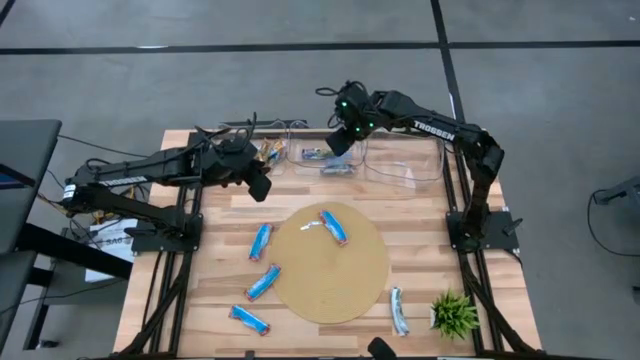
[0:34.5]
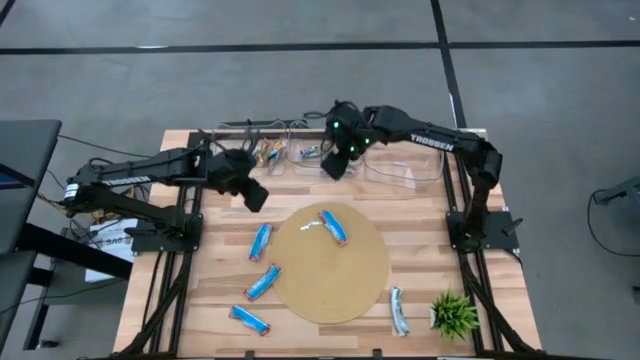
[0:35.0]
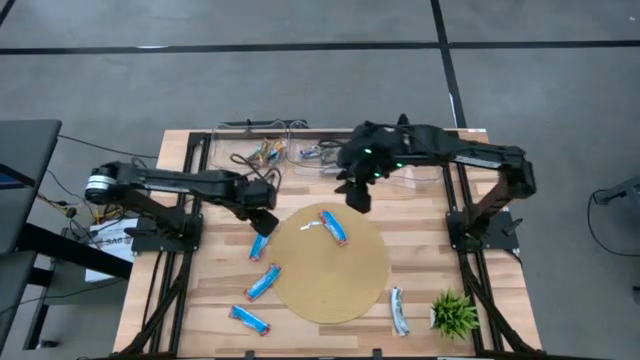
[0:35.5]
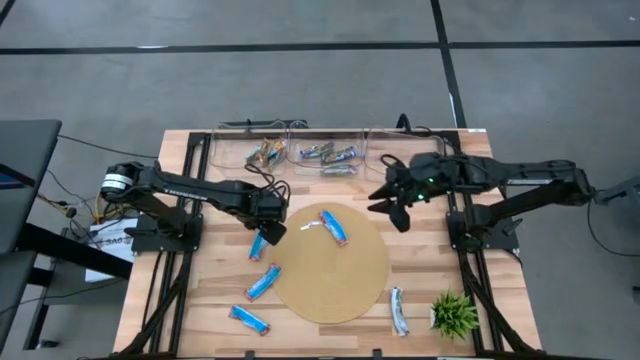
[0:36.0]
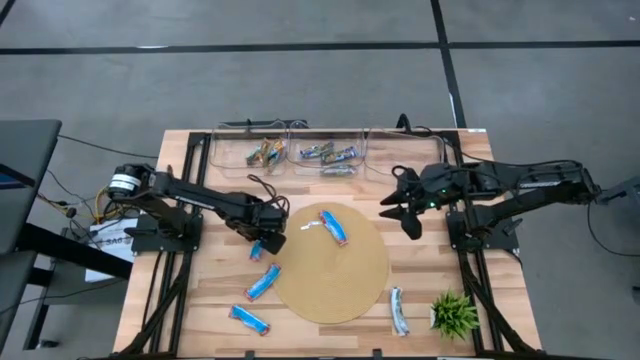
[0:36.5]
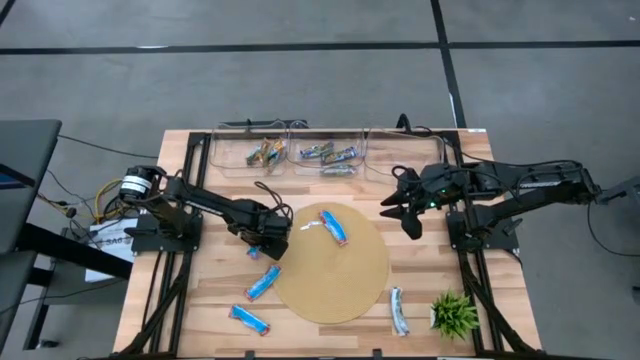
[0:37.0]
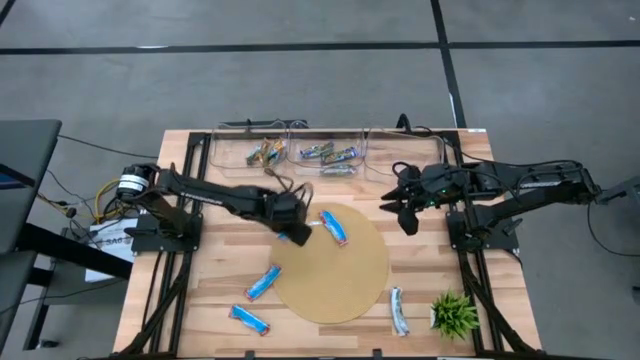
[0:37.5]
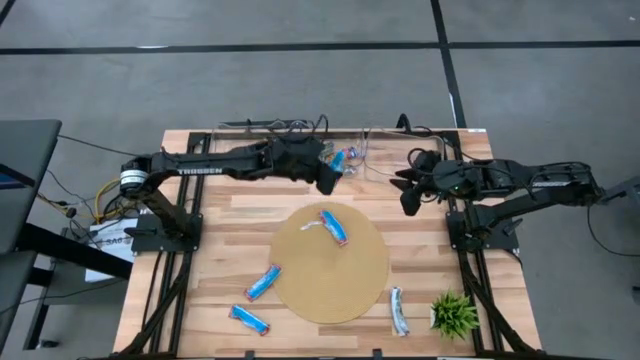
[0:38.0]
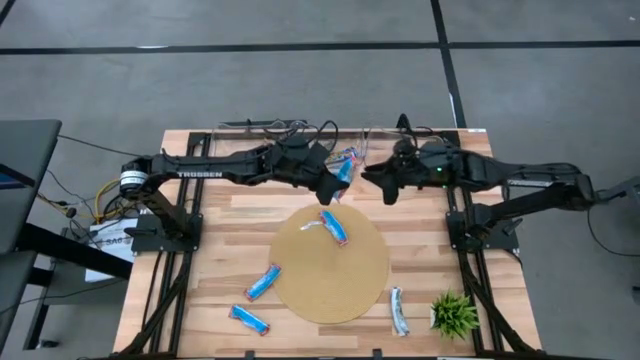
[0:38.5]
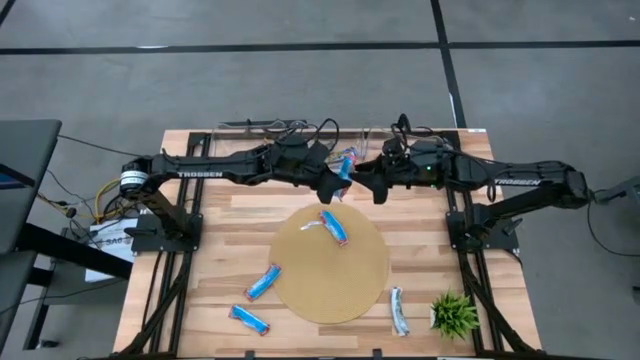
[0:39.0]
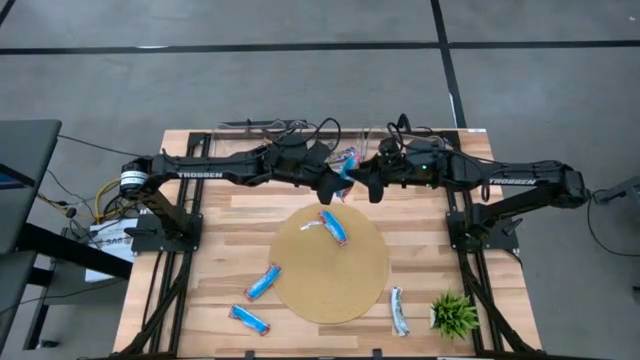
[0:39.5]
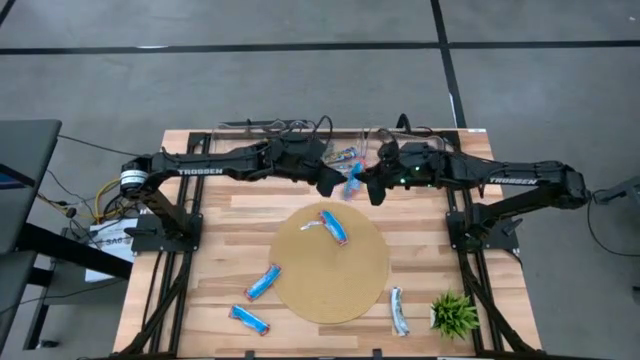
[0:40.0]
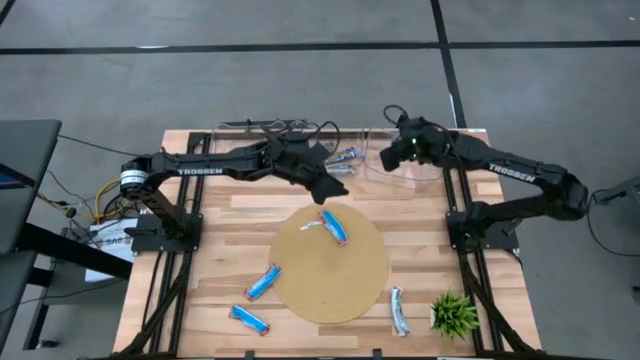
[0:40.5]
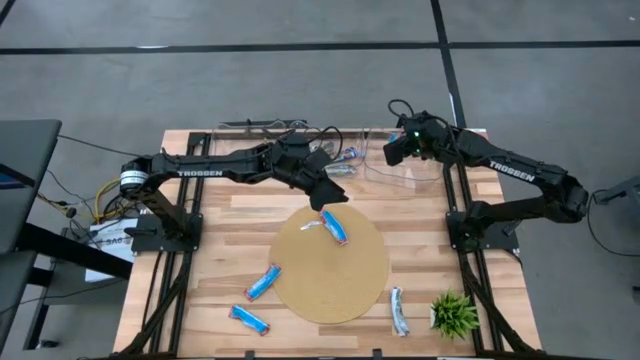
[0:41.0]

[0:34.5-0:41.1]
Task: Pick and place Granola Bars by type
Put the red granola bar into the center transparent bin

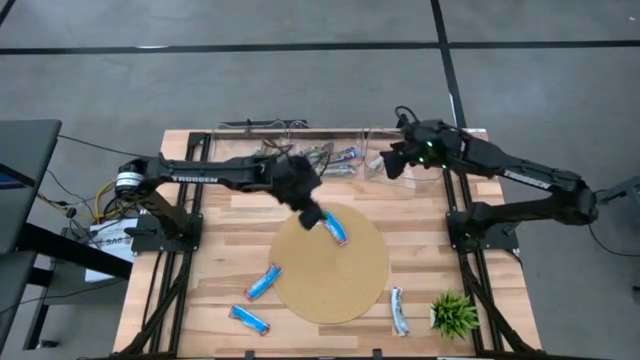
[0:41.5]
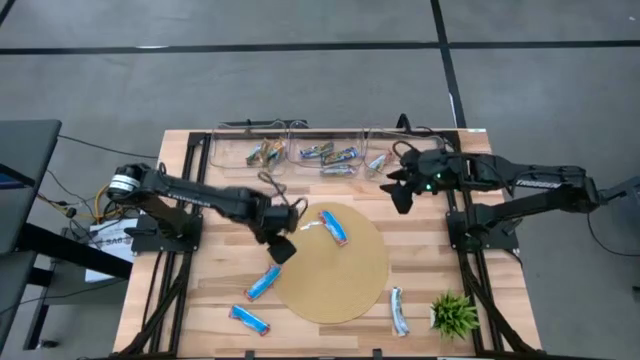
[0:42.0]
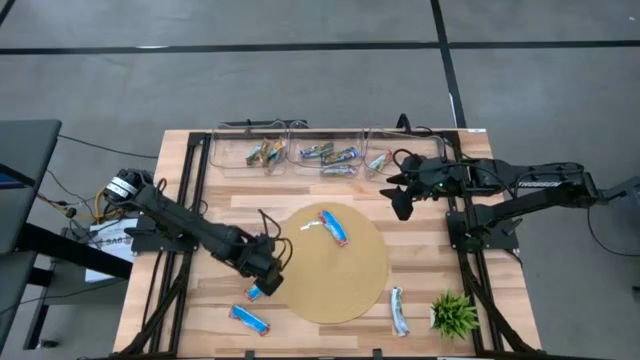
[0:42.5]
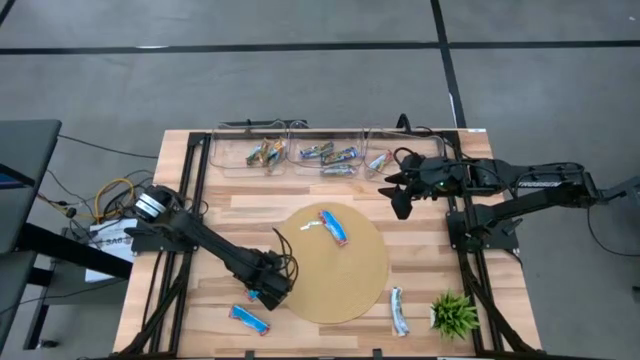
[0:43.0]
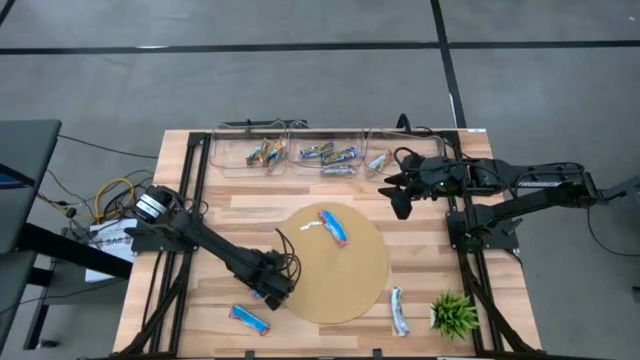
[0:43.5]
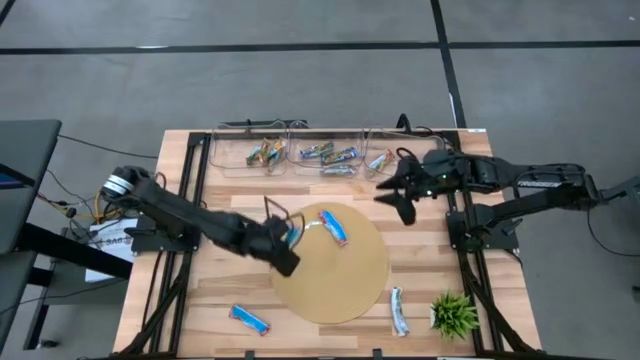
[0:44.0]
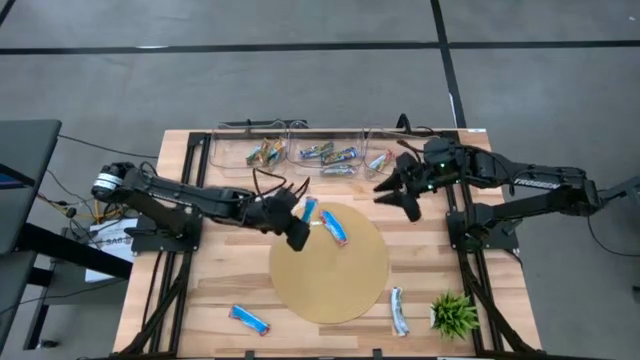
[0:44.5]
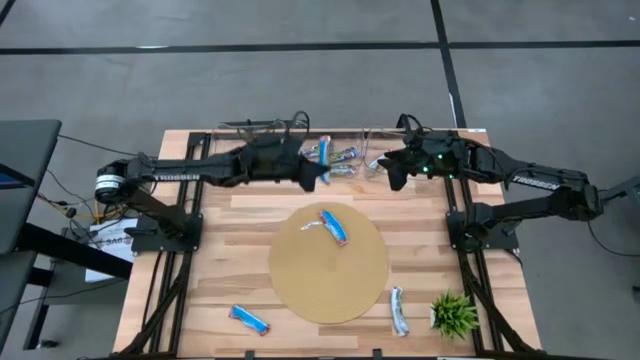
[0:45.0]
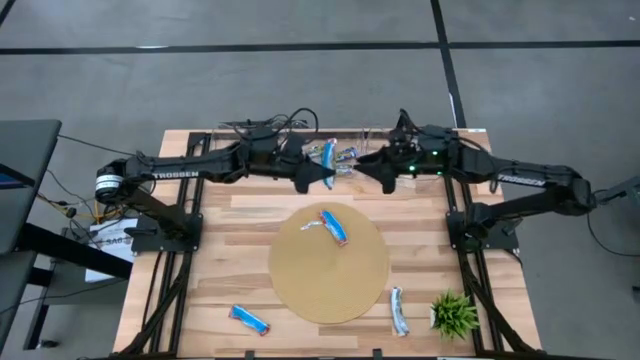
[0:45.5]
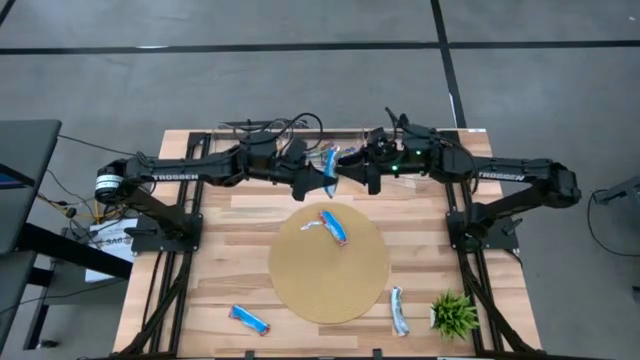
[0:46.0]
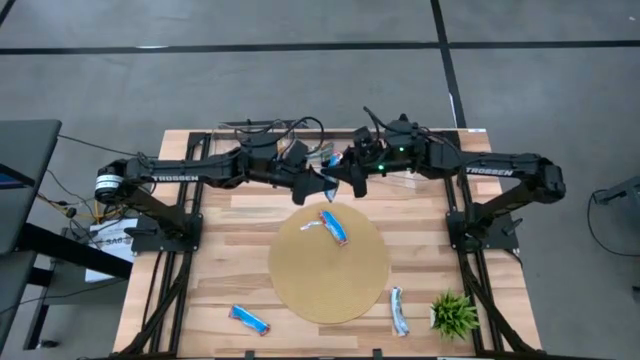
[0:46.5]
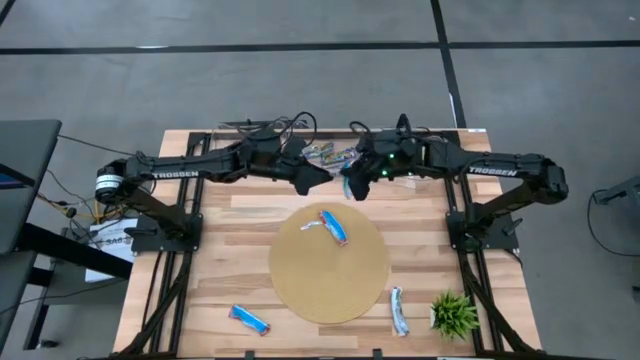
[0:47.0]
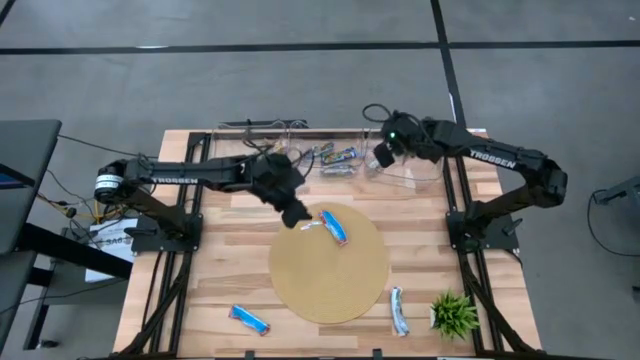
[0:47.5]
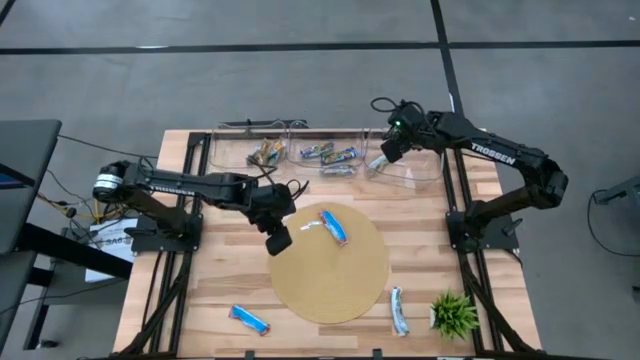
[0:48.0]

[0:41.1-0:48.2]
Put the red granola bar into the center transparent bin

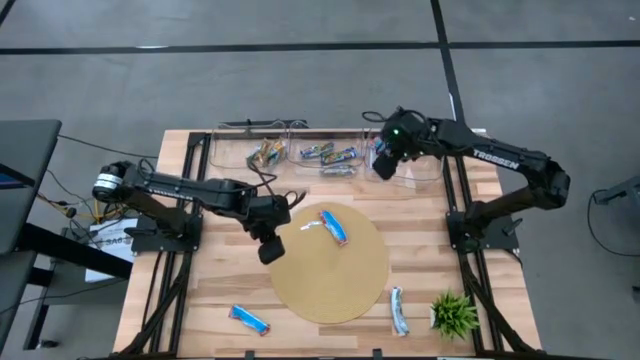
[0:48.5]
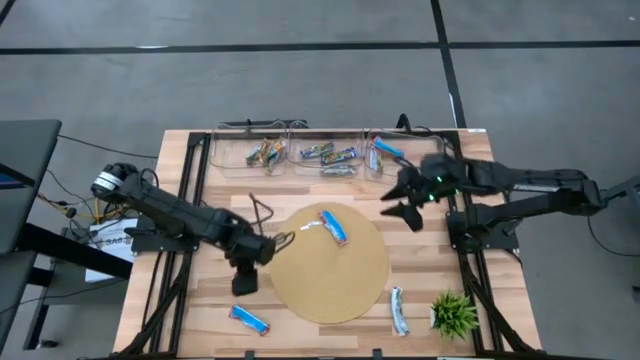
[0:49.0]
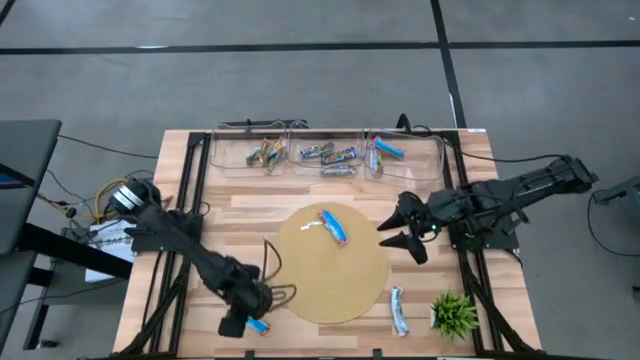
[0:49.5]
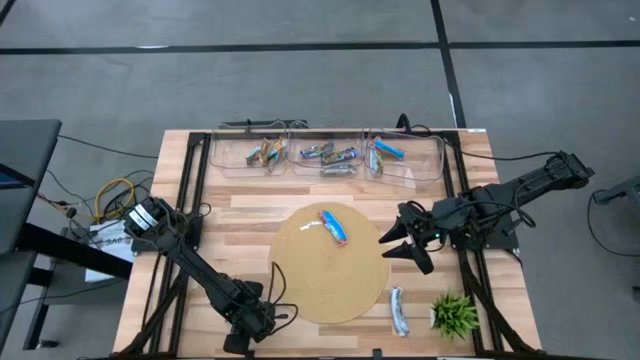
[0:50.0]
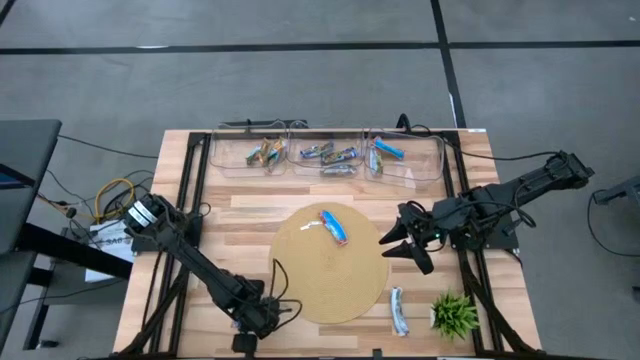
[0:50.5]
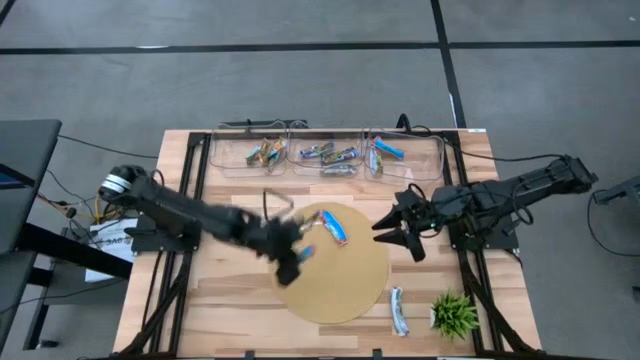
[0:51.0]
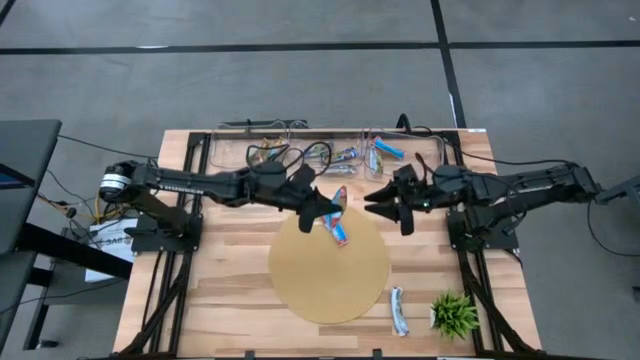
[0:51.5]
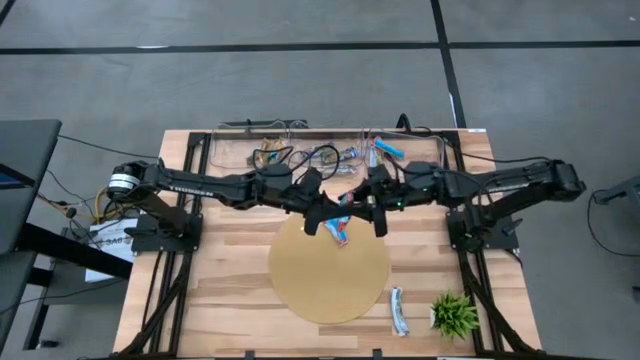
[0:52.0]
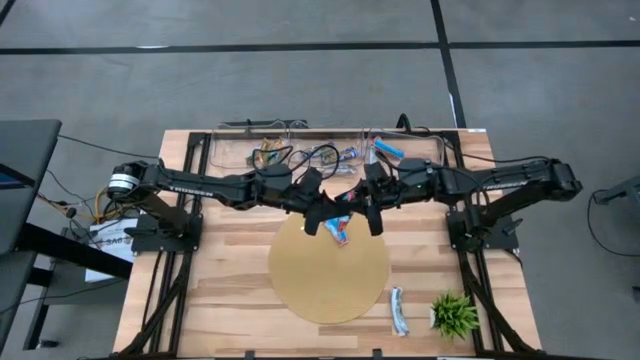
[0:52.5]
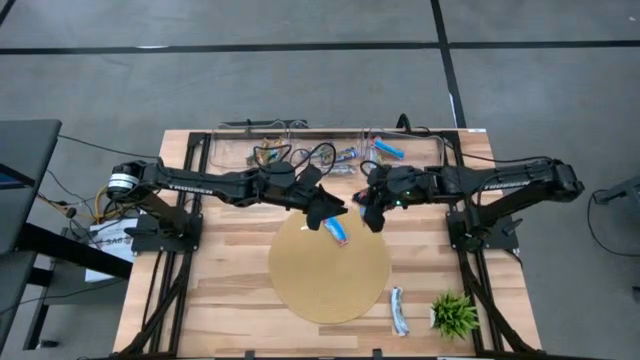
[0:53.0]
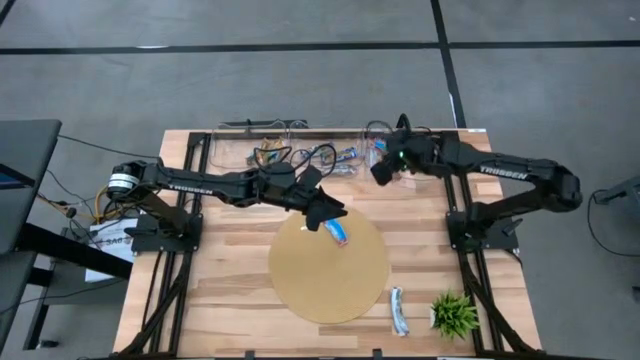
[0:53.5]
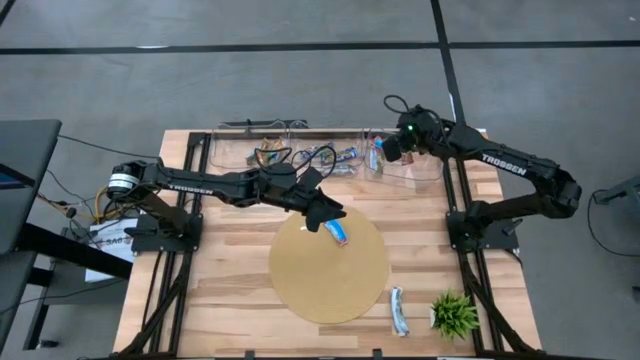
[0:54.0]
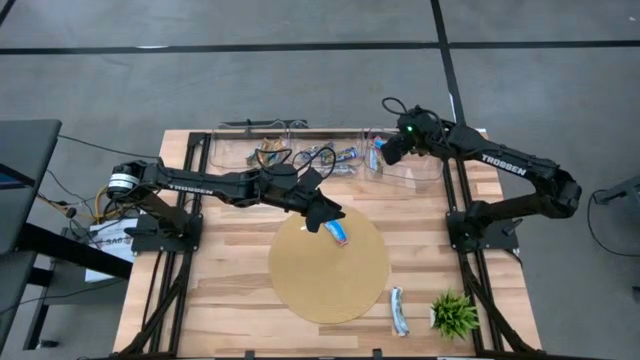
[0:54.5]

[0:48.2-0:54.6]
Put the red granola bar into the top right transparent bin

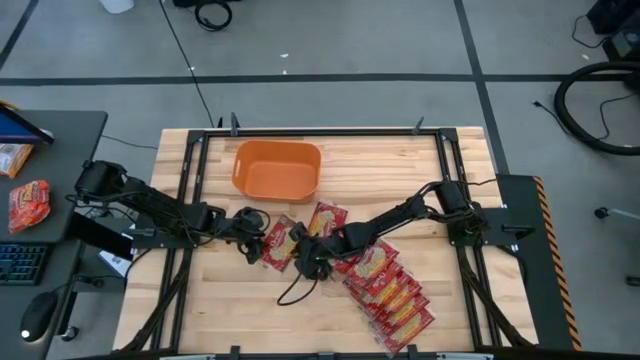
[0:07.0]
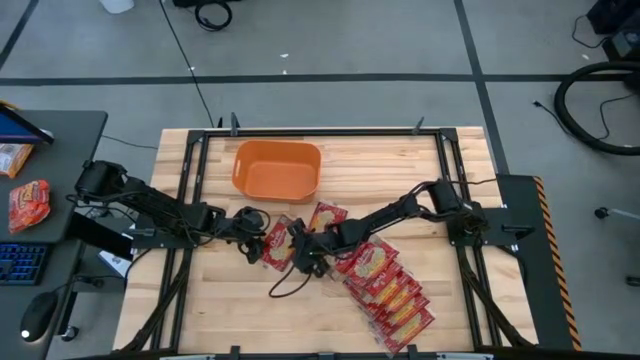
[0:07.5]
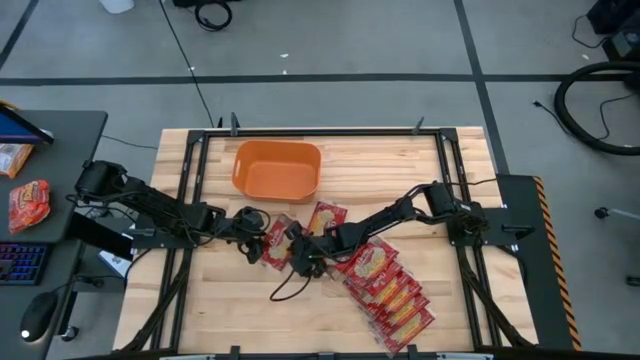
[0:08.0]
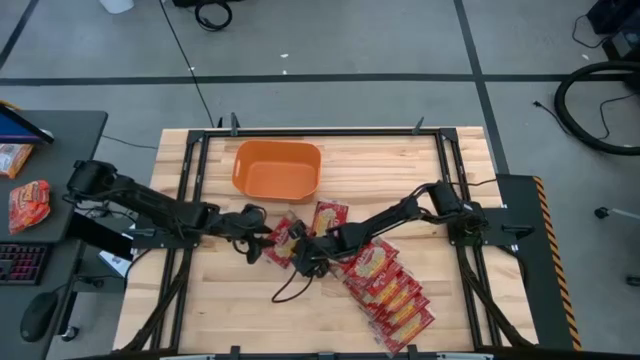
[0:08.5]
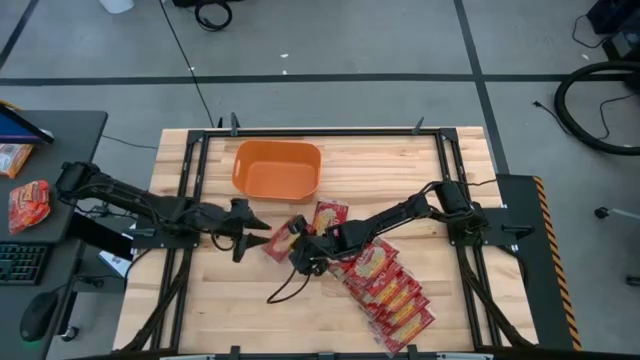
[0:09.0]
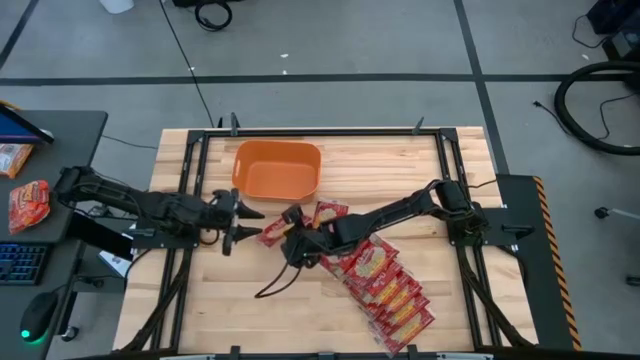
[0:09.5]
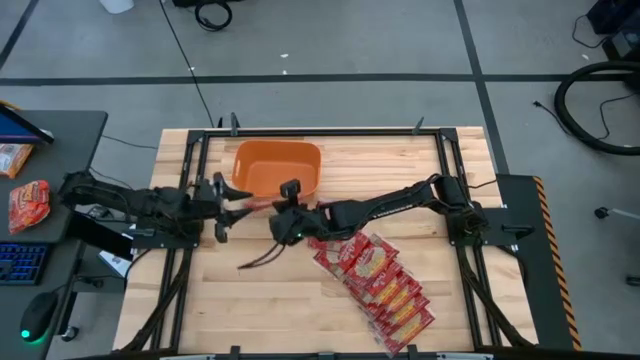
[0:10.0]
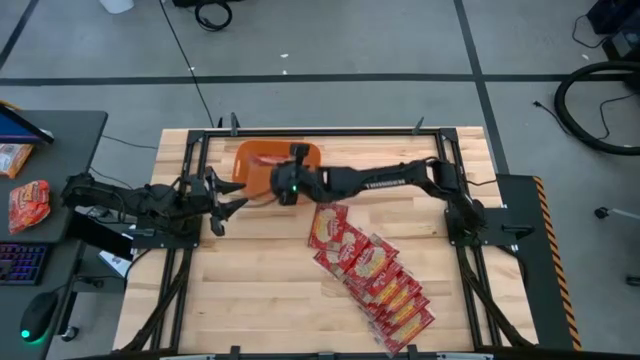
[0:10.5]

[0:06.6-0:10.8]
Task: Sort popcorn bags into baskets
Put the popcorn bag into the orange bin
